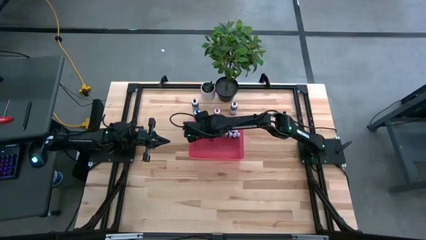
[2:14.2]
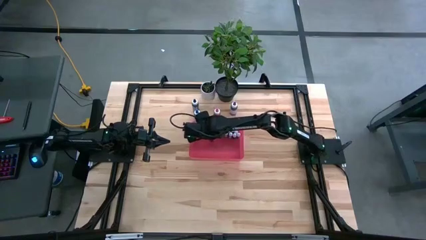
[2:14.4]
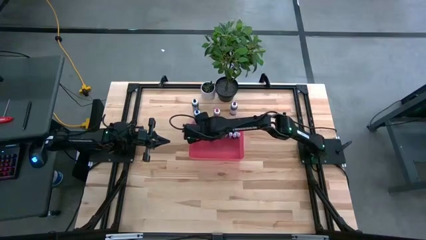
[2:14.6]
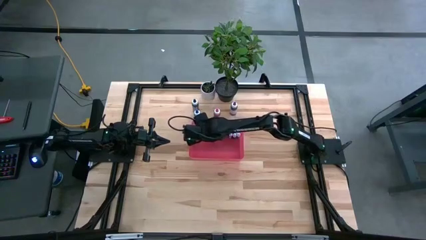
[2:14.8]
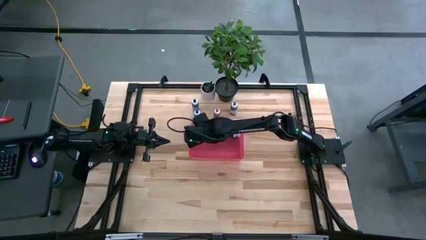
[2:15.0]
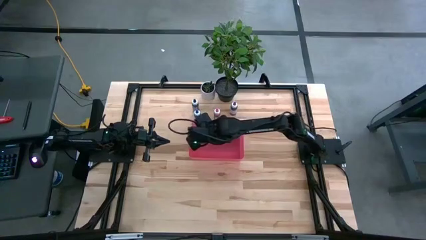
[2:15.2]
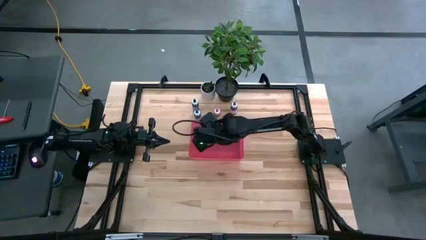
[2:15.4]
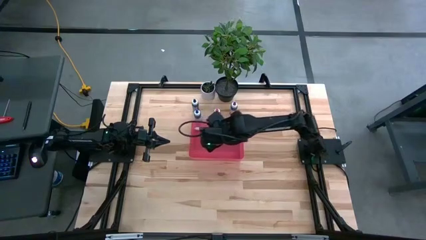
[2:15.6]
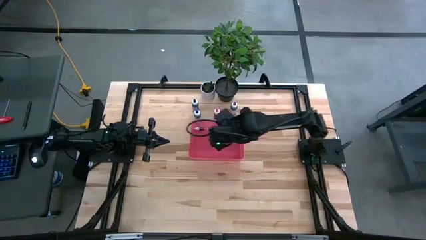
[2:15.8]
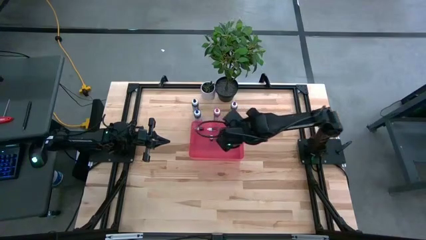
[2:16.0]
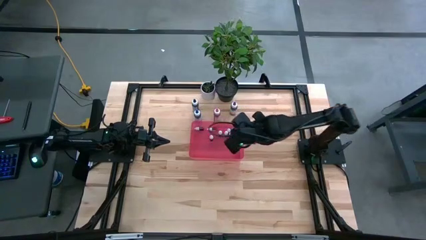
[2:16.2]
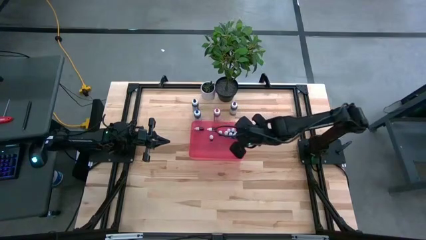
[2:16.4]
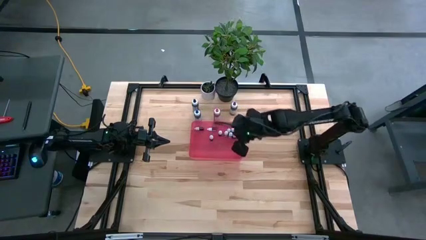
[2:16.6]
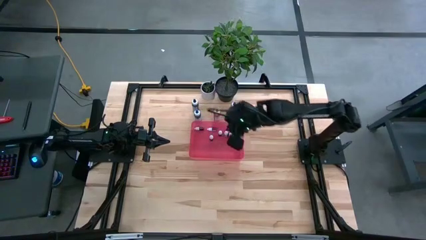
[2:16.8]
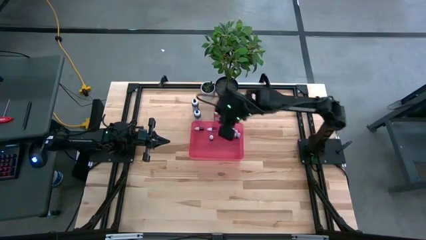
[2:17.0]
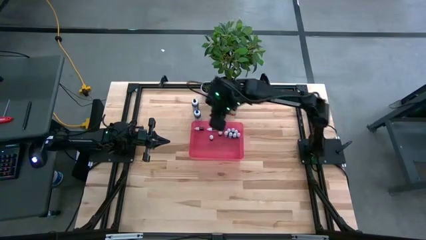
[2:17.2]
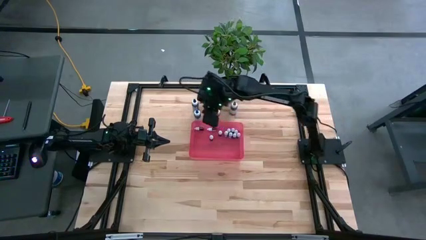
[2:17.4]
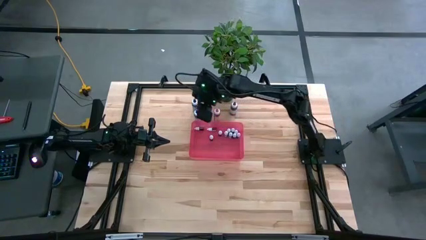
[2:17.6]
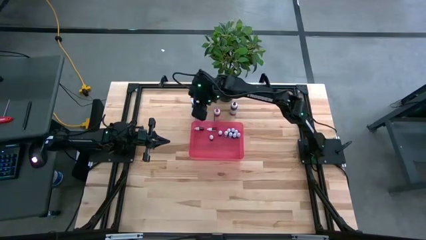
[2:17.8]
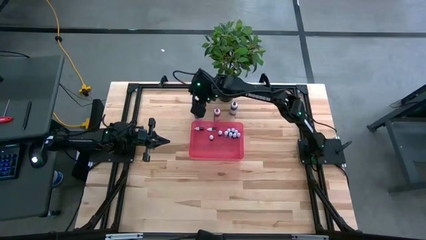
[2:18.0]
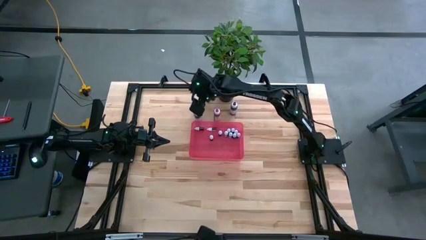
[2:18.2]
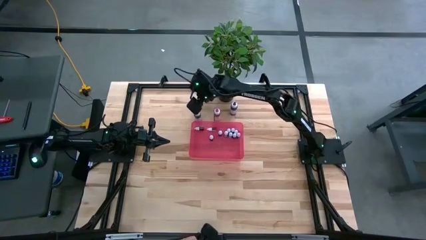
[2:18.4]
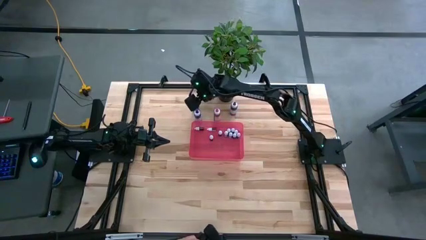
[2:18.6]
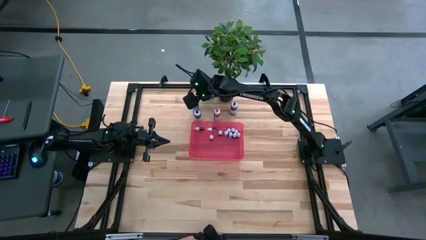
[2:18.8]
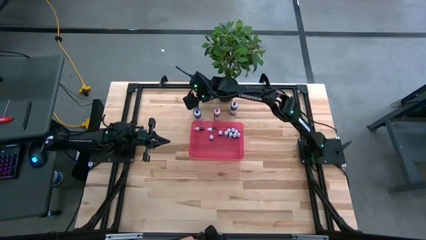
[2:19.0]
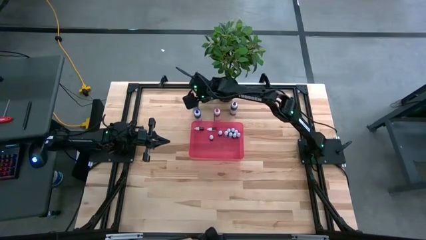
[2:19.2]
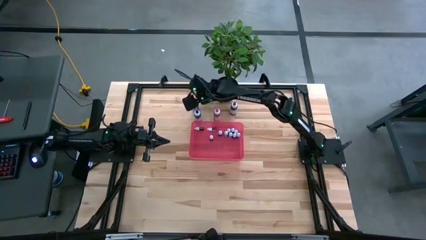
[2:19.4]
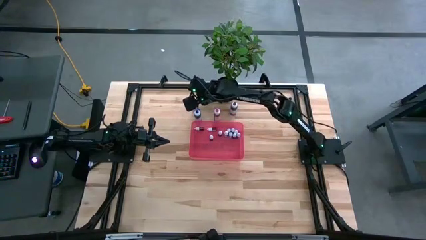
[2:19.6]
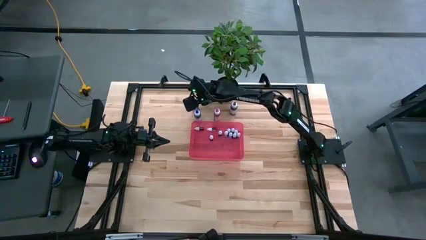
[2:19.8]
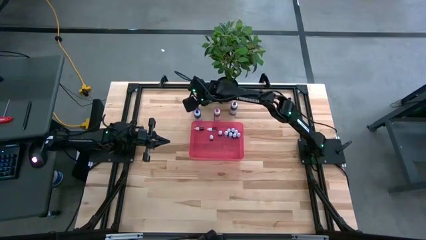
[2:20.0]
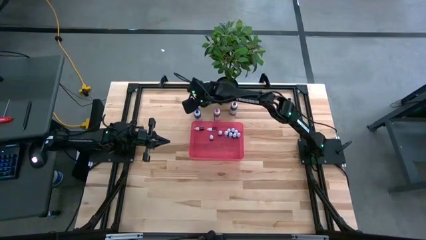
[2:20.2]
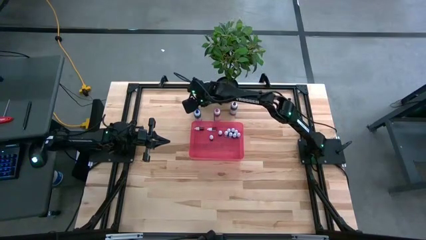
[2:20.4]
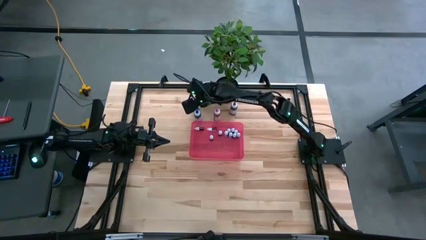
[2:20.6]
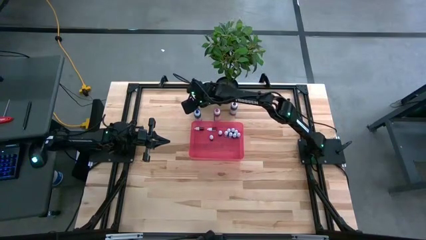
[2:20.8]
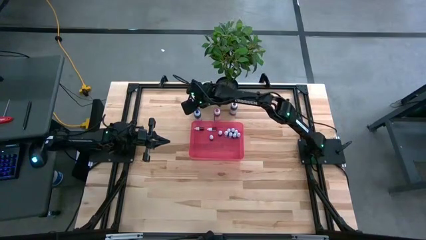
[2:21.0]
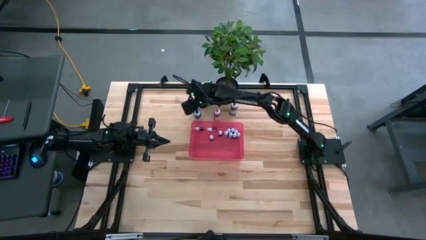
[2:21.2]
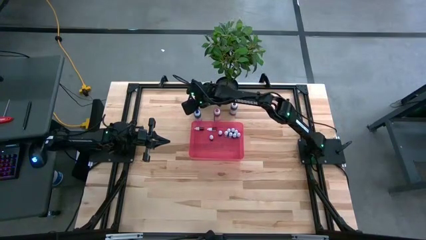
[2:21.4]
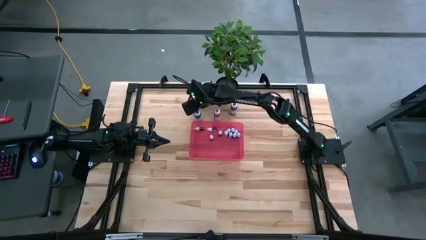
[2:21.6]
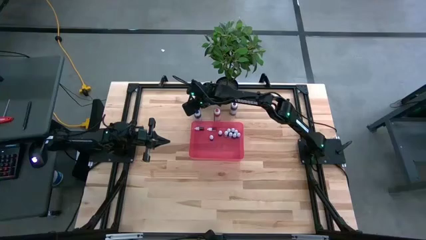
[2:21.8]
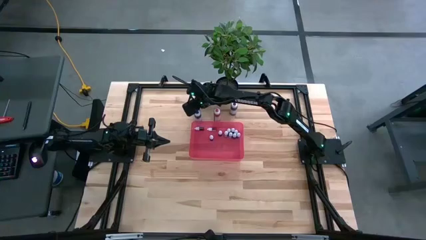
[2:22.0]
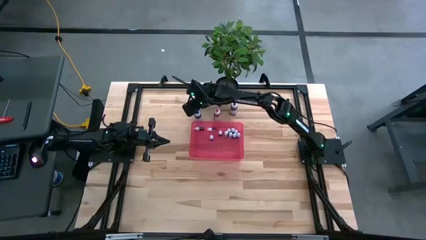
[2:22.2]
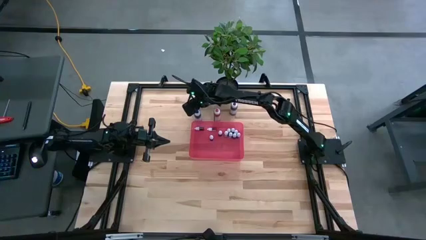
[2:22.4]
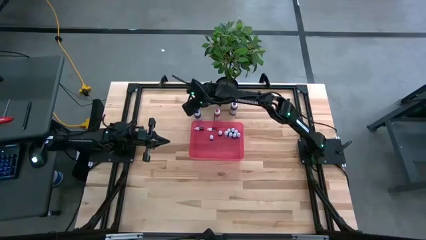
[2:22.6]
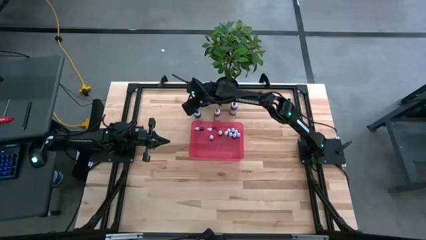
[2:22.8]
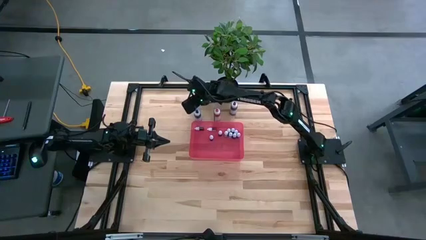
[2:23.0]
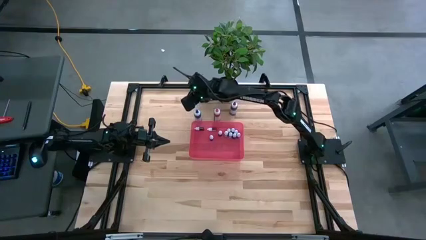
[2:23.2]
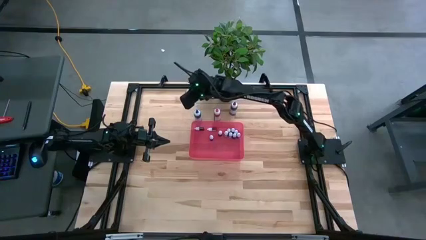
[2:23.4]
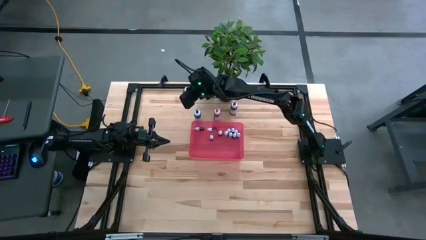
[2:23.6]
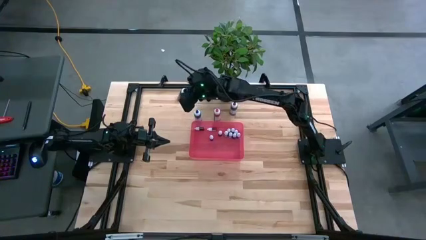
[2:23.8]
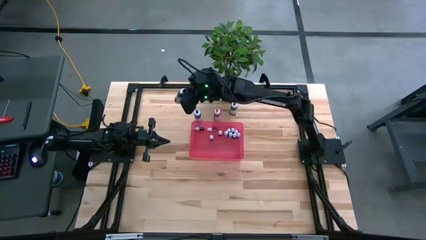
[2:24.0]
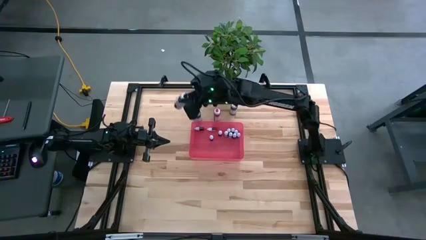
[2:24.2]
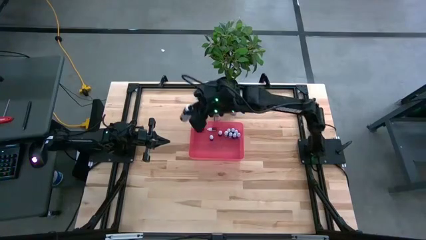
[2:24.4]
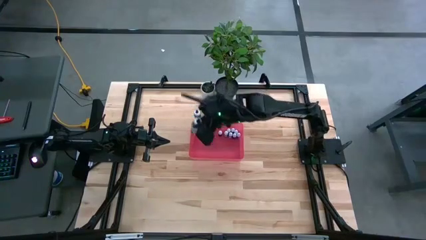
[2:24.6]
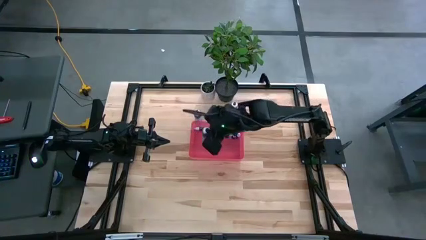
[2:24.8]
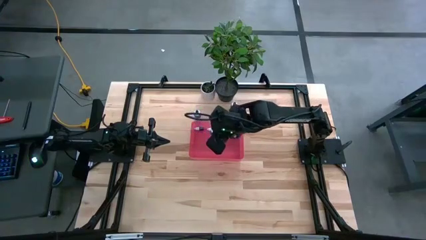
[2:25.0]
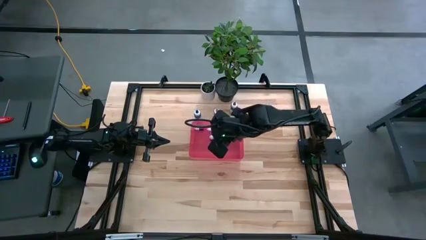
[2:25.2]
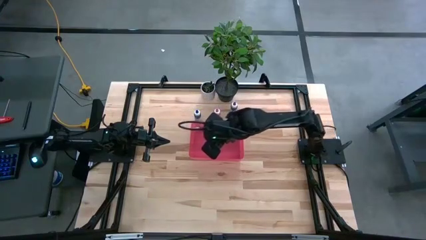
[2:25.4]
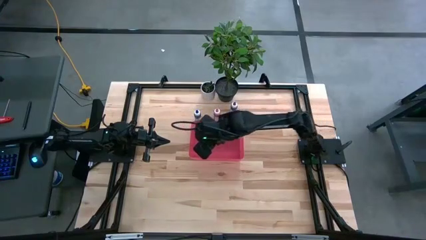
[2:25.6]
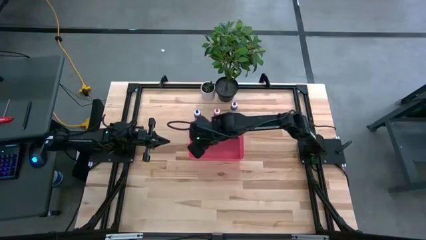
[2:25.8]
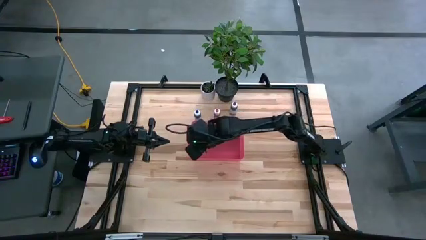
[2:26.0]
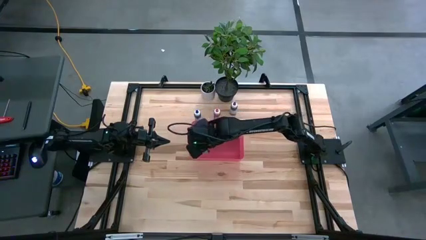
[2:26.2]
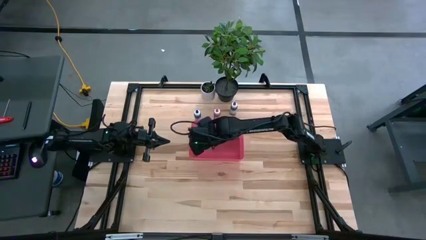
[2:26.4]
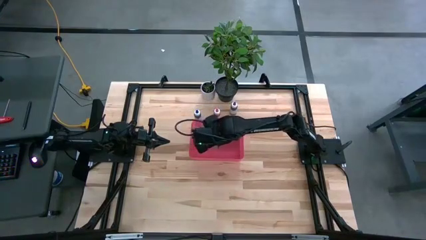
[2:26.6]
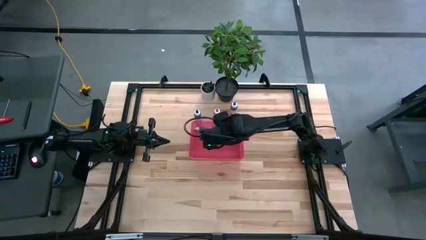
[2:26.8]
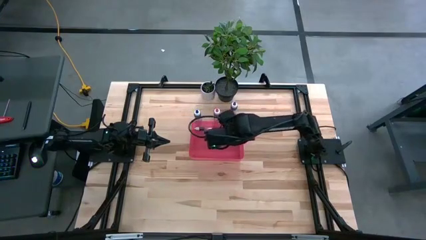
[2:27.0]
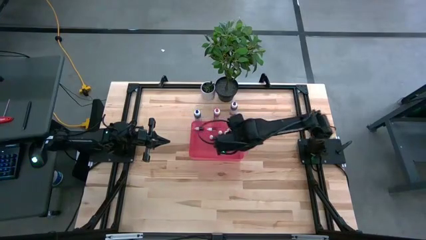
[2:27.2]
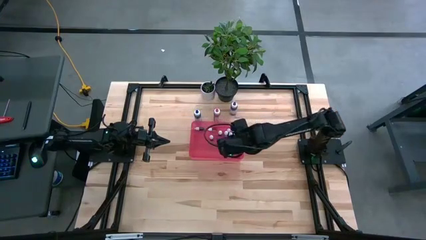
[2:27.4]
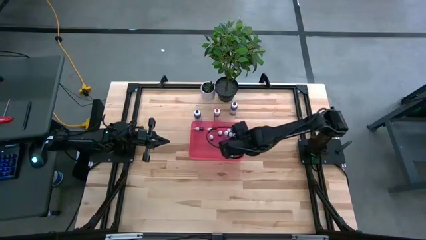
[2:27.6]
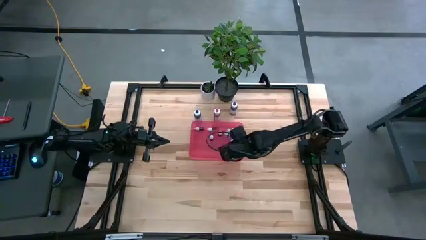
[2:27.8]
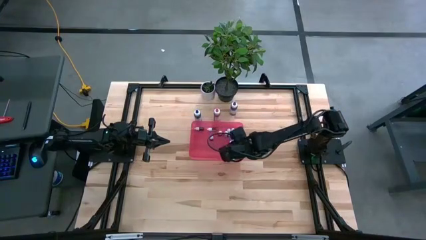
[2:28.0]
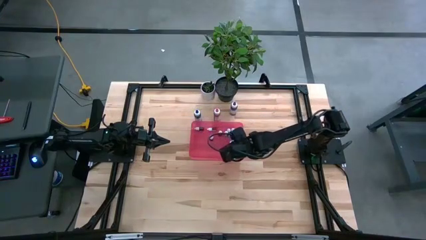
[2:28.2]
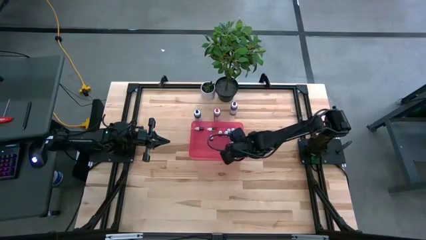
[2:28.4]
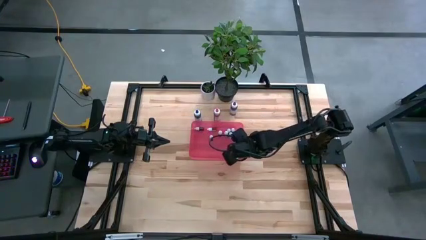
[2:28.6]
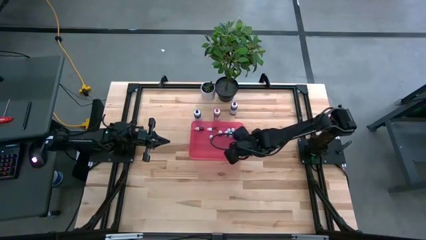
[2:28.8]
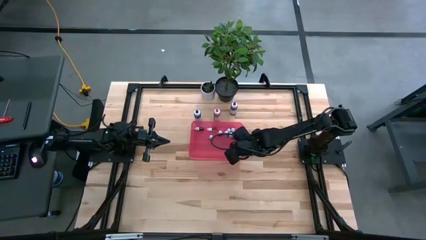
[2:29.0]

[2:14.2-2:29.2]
Task: Pick & Place food coloring
Put the large black food coloring bottle into the pink container
